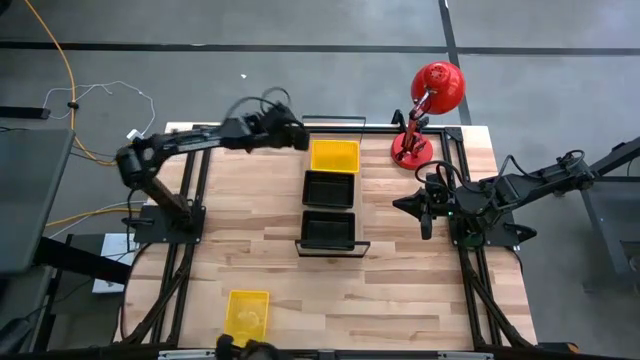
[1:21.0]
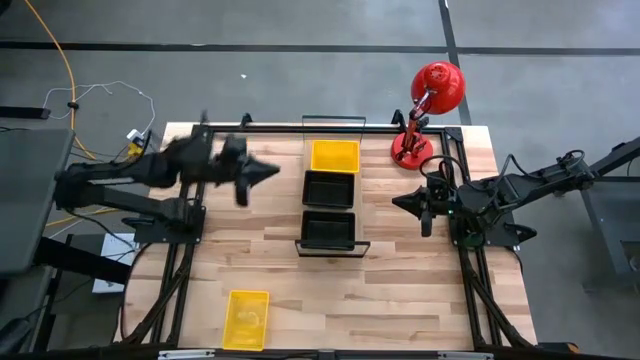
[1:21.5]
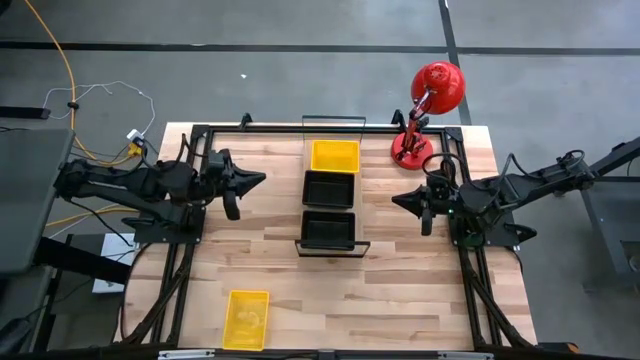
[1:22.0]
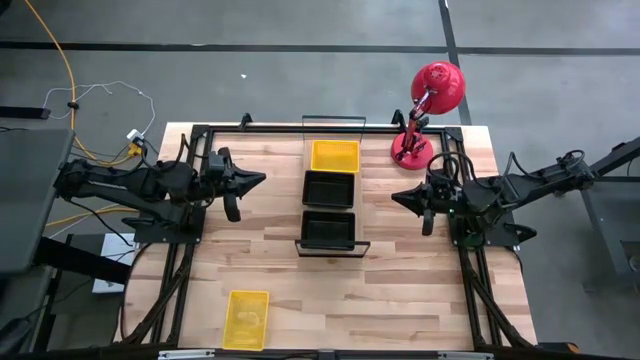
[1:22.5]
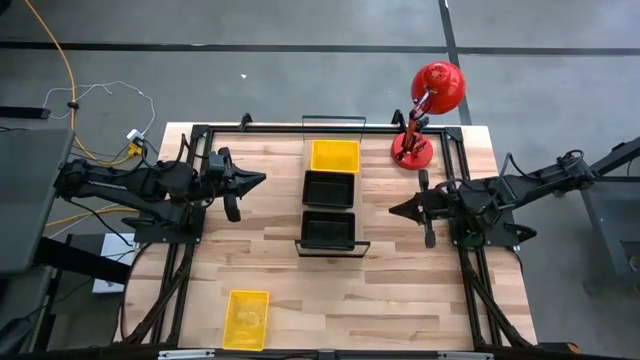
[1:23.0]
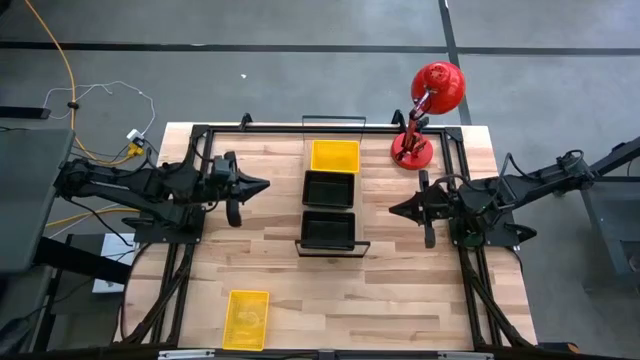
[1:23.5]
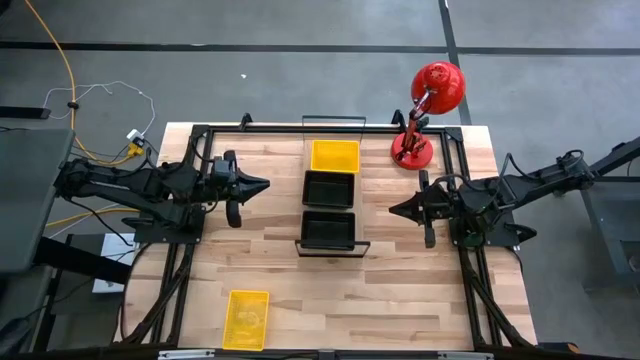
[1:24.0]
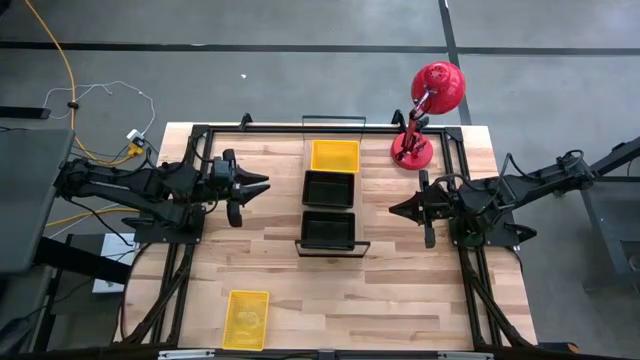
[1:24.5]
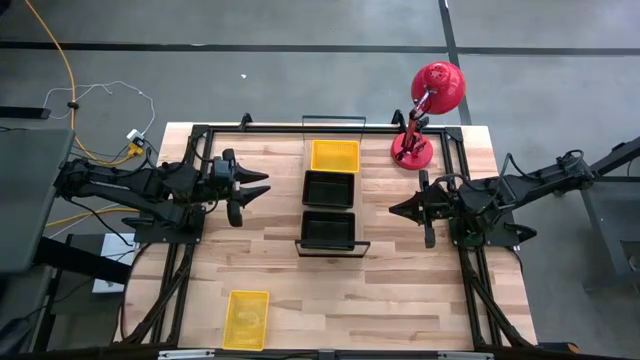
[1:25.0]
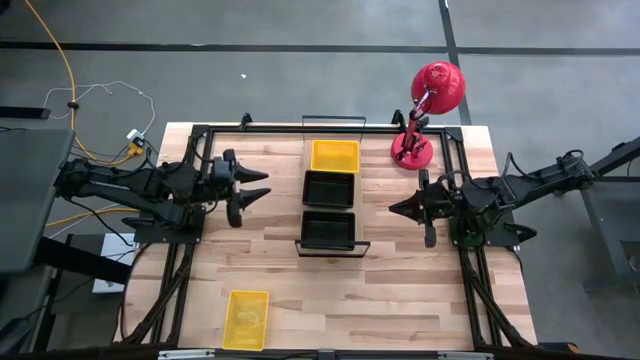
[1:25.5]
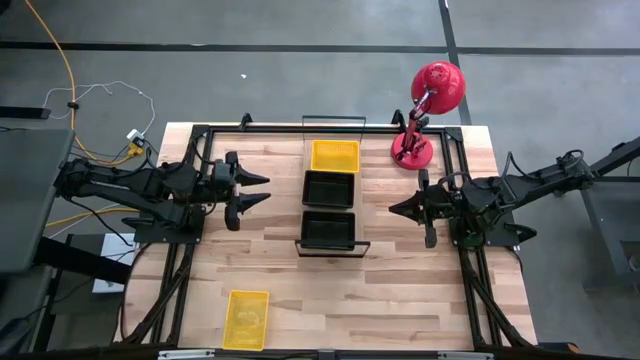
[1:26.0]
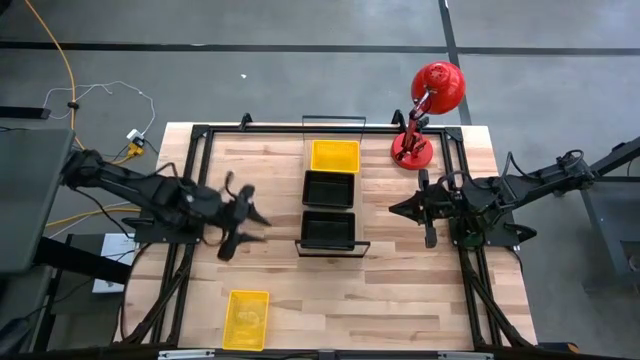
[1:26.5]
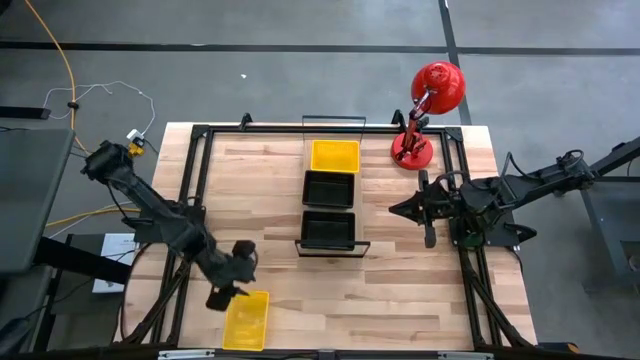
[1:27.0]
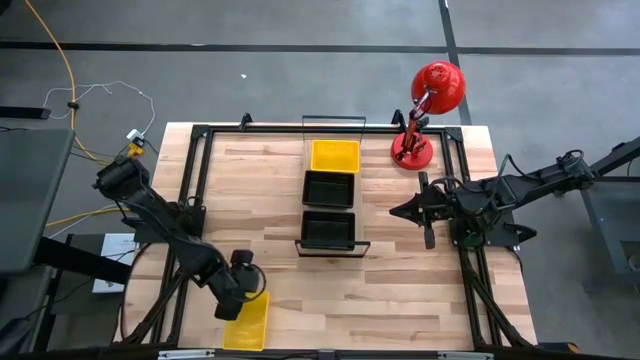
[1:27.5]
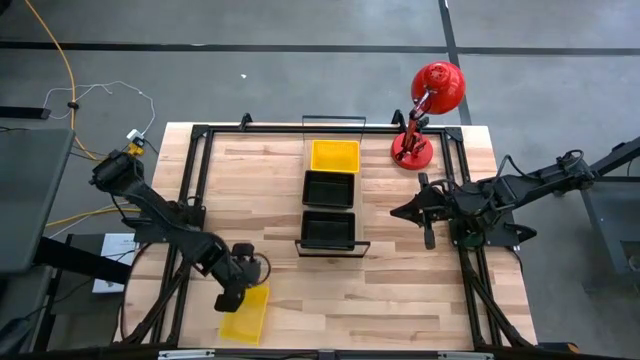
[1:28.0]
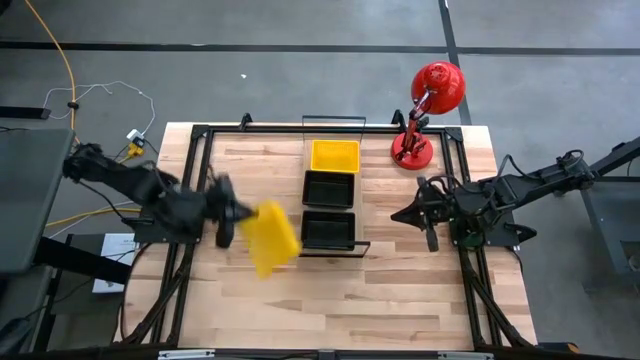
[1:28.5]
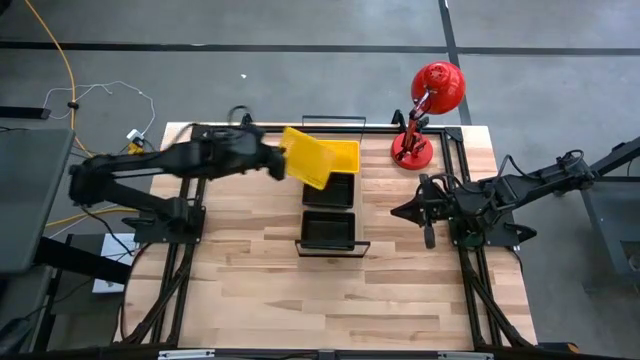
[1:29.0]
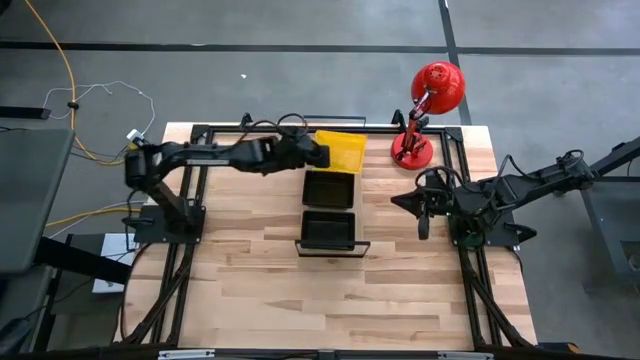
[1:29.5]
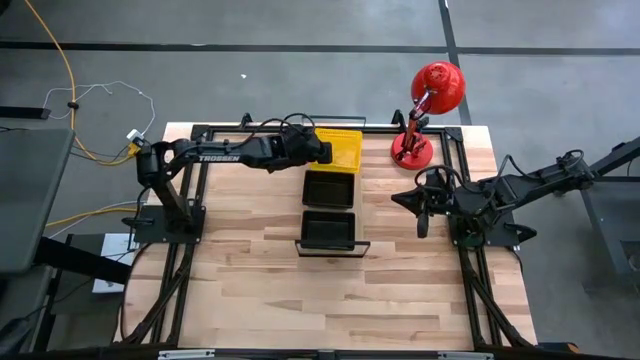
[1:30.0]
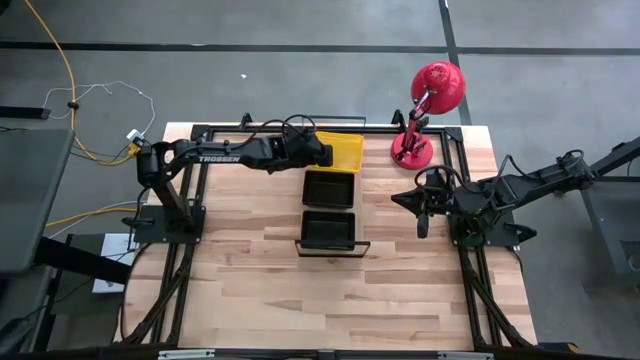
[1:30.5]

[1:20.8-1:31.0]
Task: Stack baskets on shelf by color
Stack the yellow bin on top of the yellow bins on the shelf

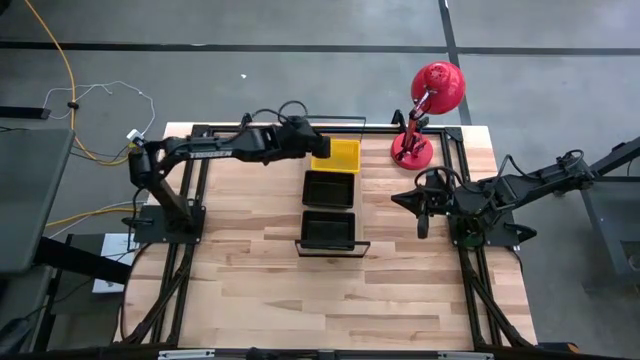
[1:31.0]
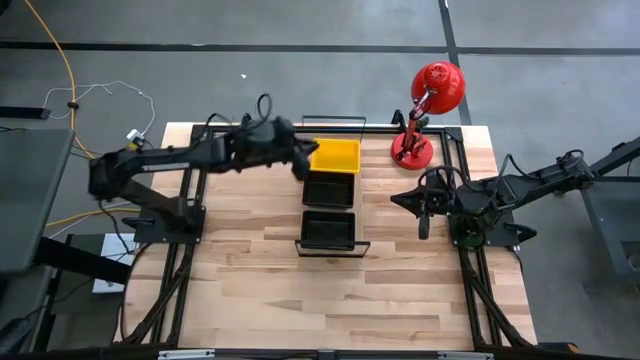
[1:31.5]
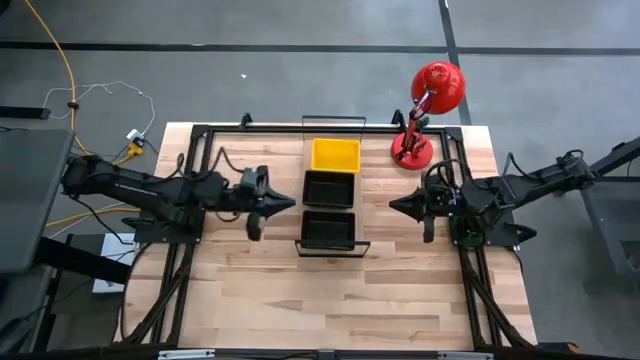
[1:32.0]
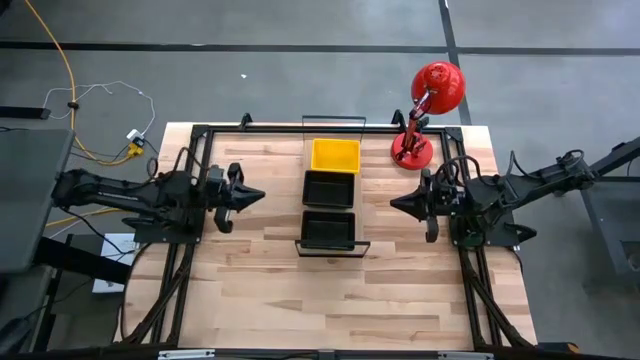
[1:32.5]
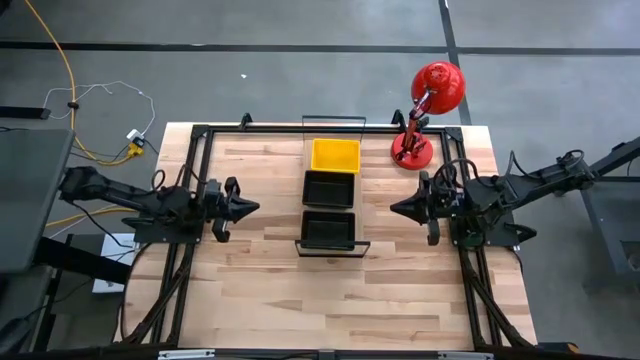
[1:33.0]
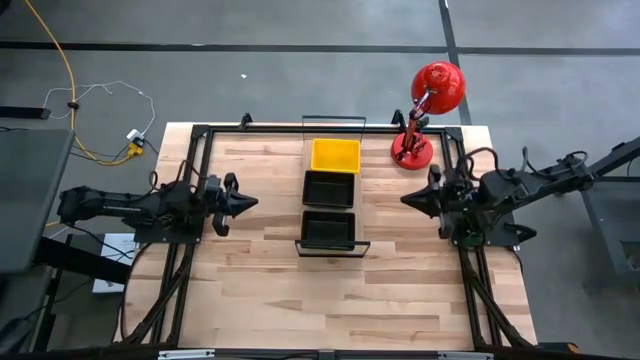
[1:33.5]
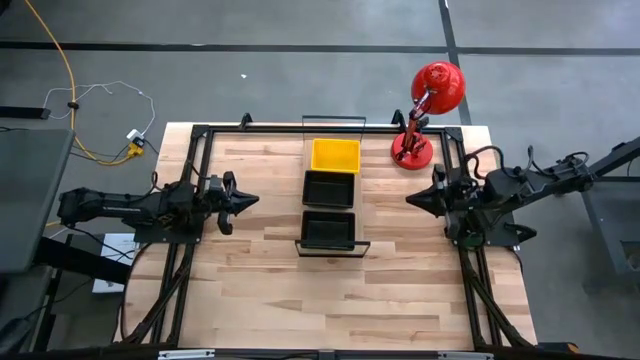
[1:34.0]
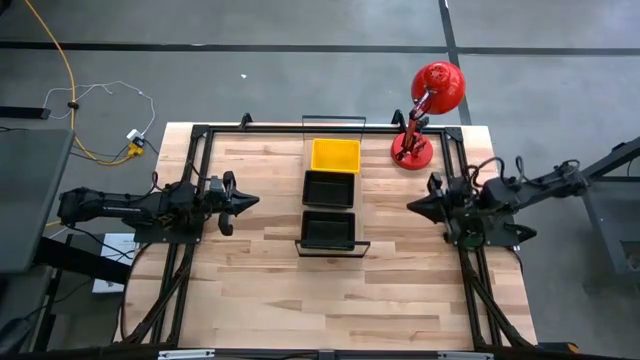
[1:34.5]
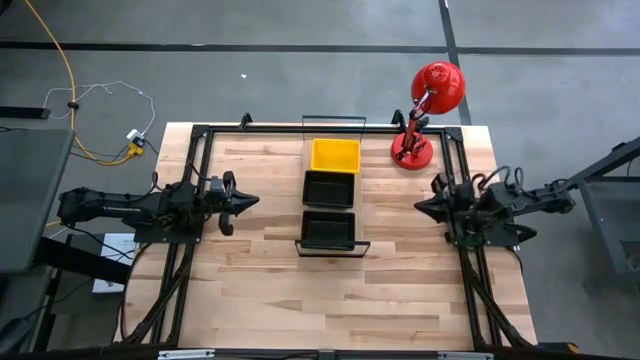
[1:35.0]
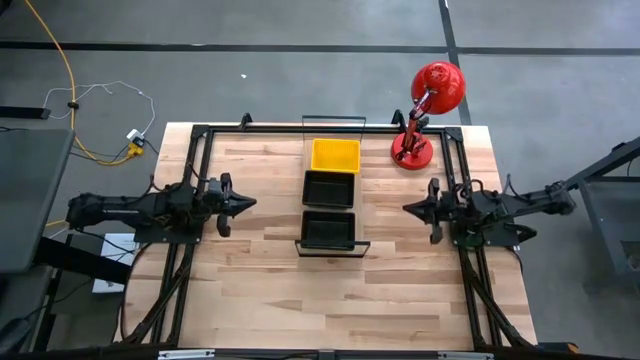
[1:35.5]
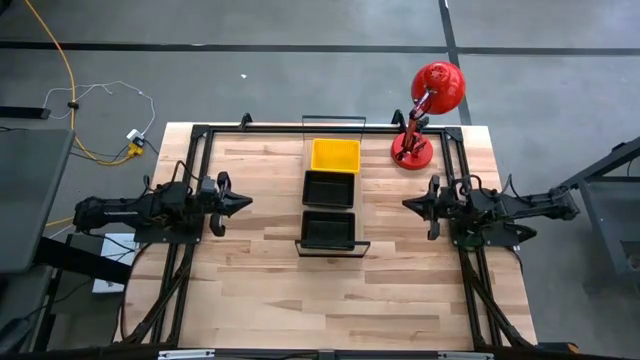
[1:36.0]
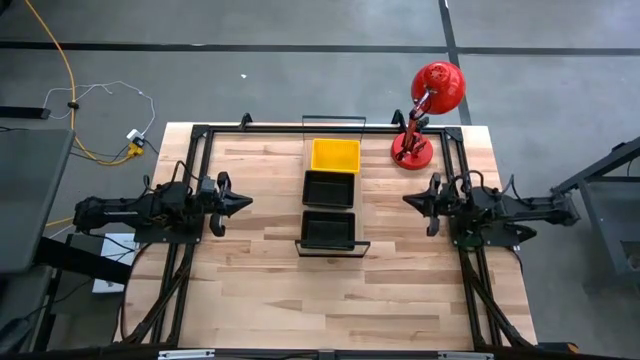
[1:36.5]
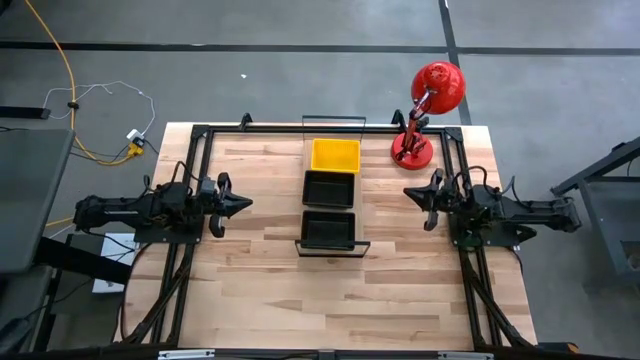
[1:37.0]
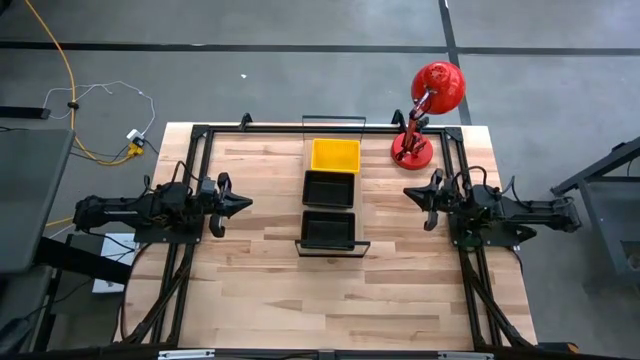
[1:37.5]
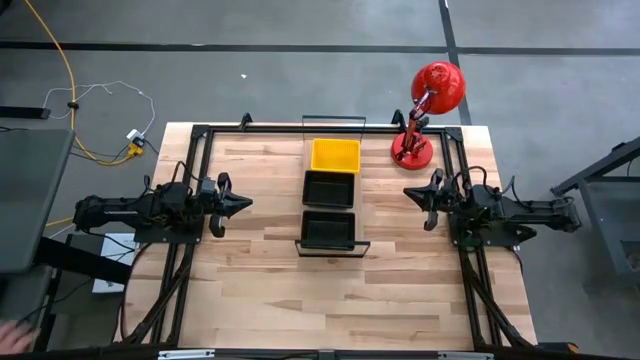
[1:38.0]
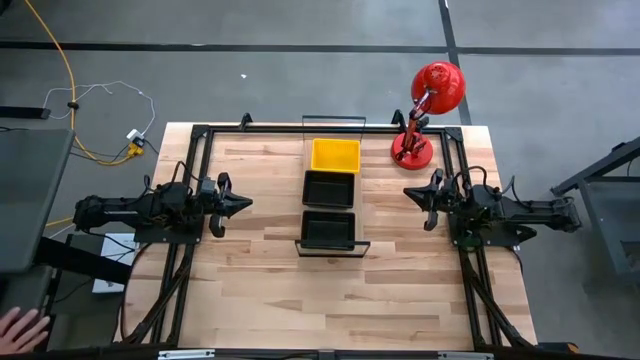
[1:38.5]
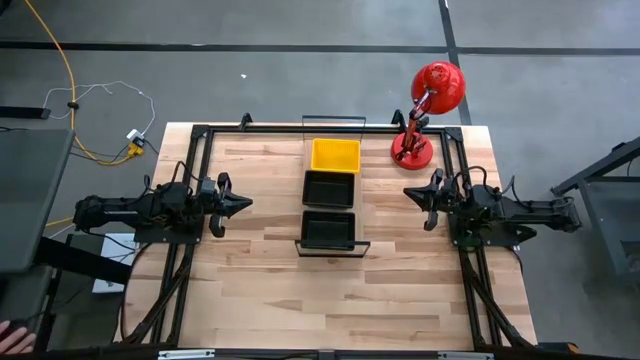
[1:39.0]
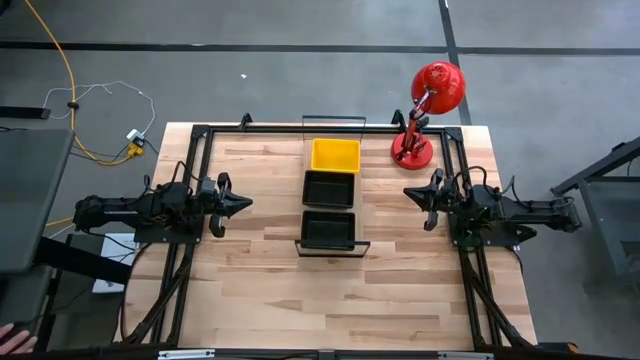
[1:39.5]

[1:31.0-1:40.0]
Return to Home Position

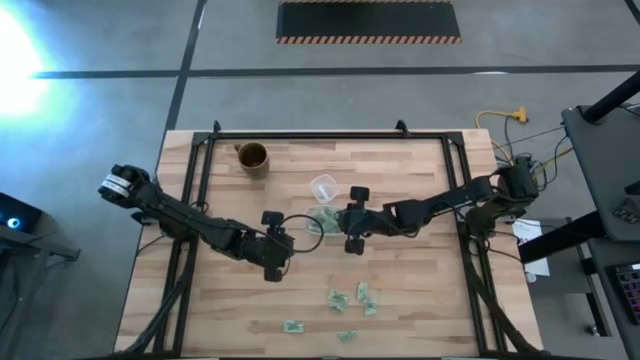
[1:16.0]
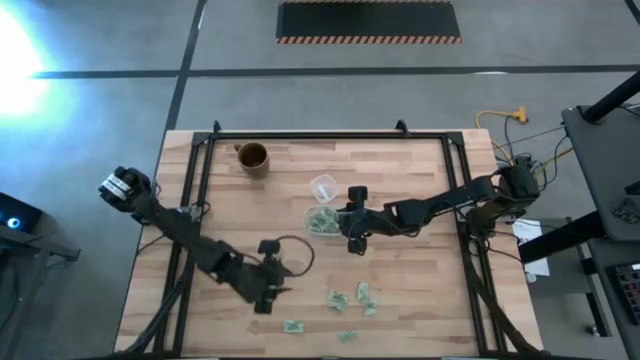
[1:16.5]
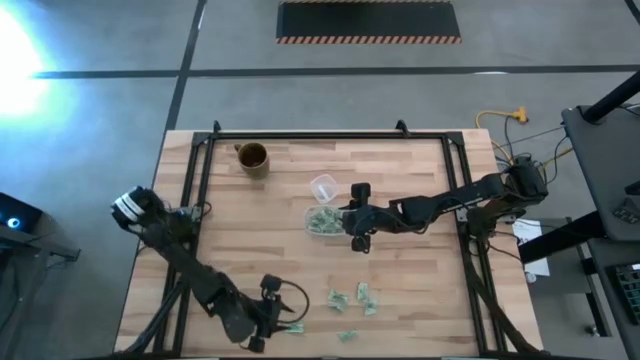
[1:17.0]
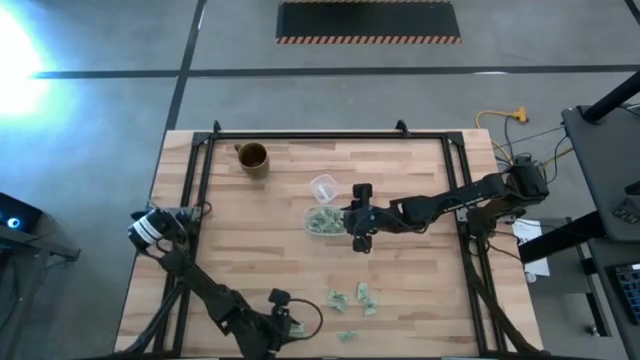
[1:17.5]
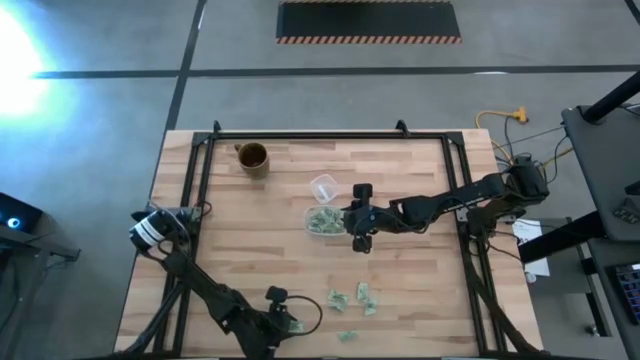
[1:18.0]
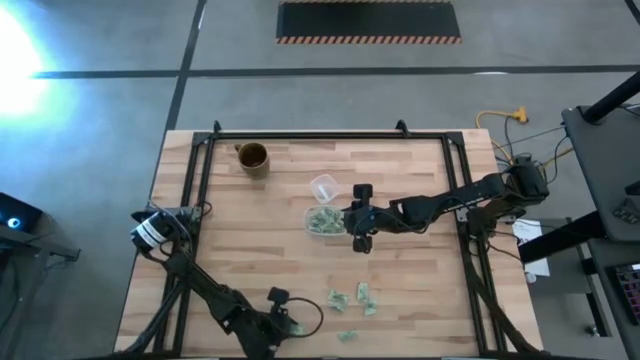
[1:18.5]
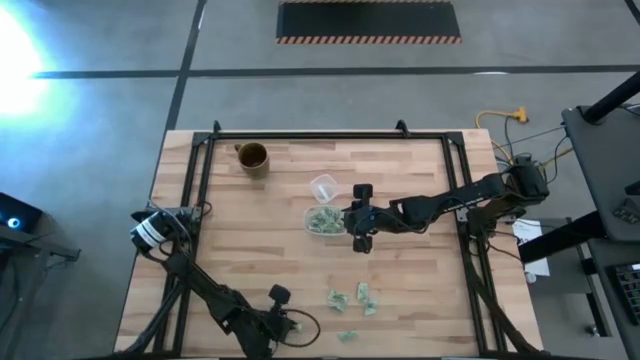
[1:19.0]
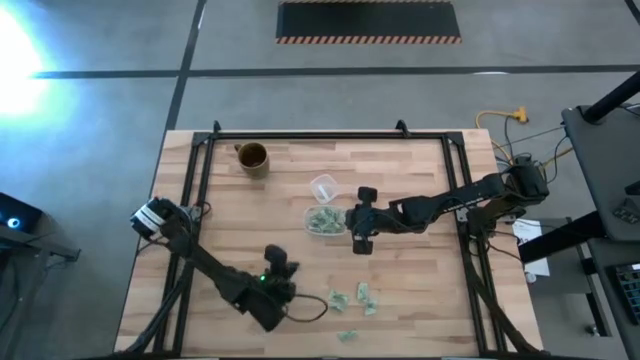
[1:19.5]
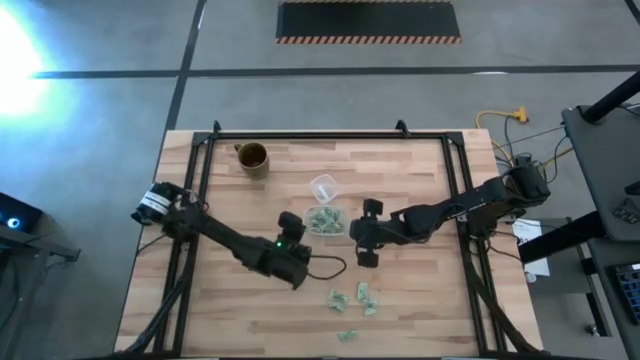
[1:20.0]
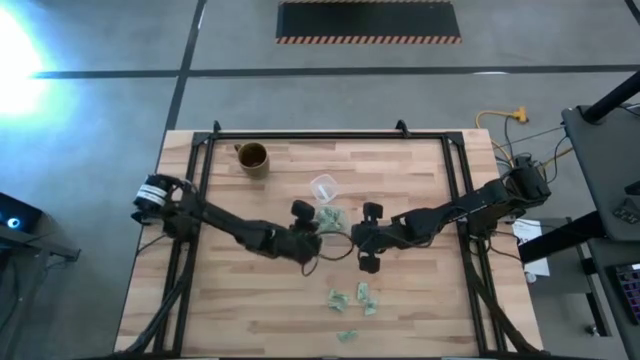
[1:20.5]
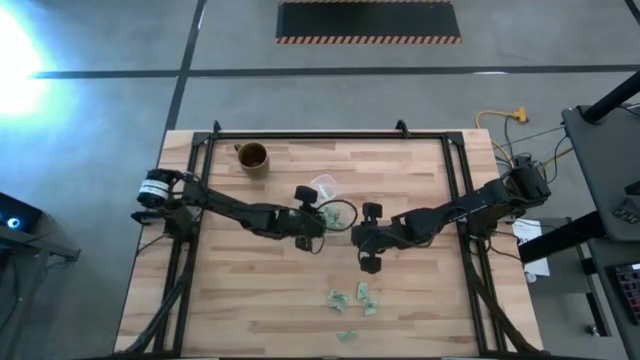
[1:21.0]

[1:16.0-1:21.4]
Task: Pick and place Stevia / Truvia into bins
Put the stevia packet into the bottom transparent container
